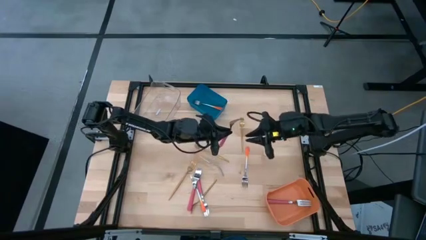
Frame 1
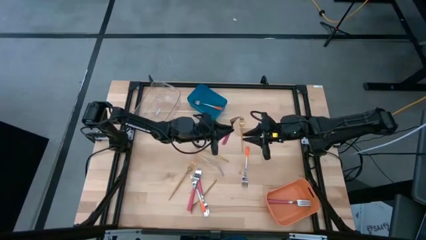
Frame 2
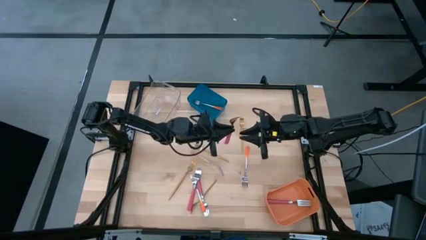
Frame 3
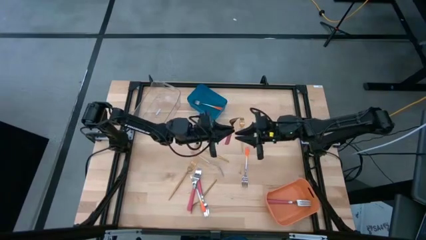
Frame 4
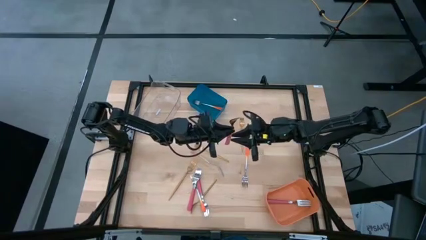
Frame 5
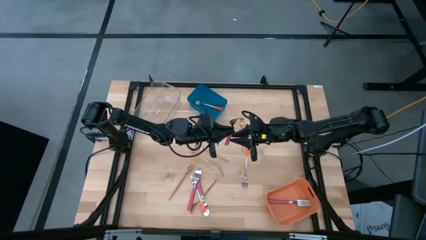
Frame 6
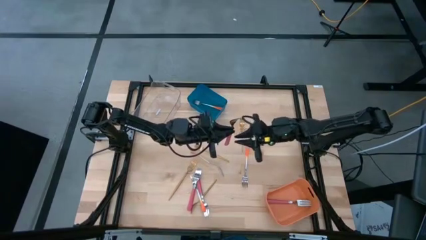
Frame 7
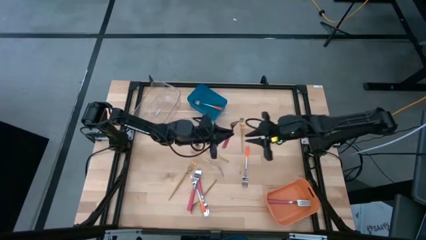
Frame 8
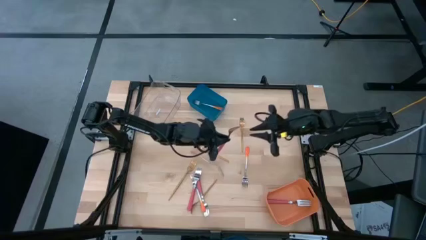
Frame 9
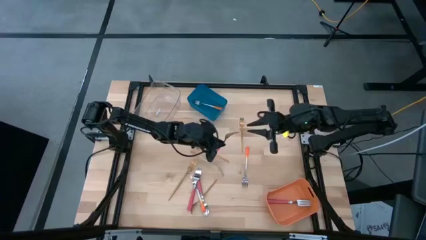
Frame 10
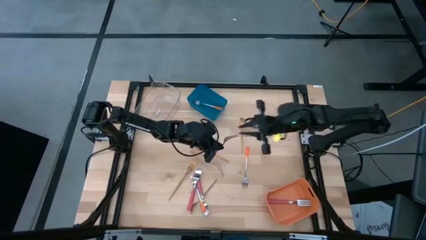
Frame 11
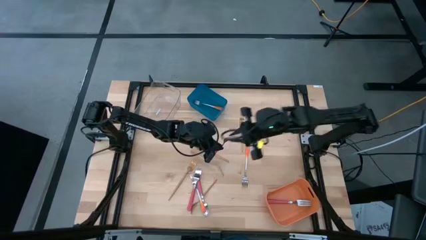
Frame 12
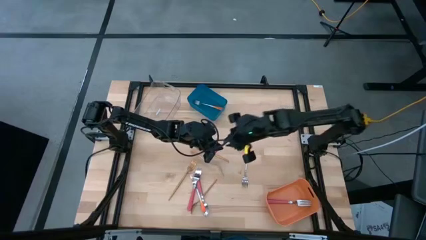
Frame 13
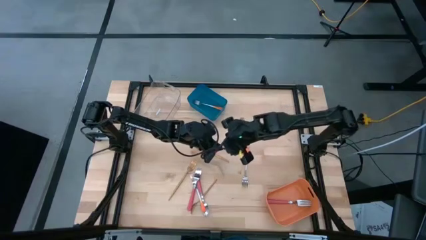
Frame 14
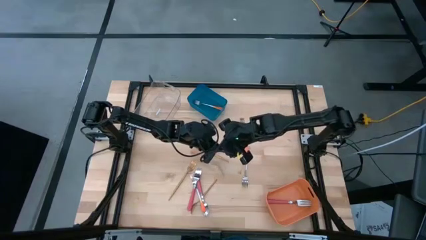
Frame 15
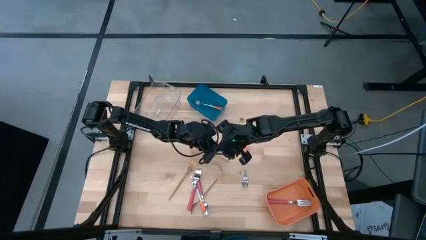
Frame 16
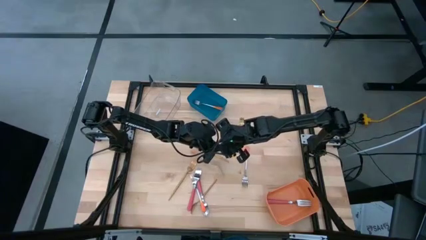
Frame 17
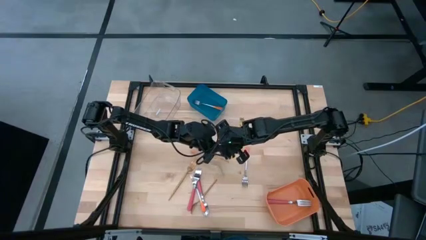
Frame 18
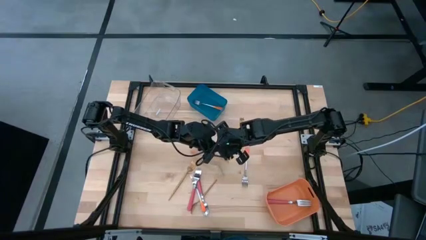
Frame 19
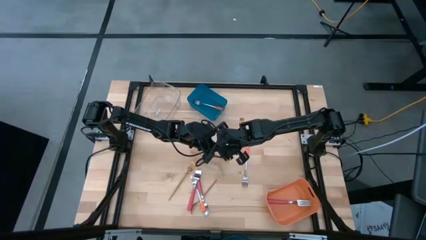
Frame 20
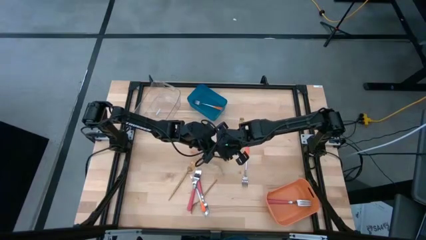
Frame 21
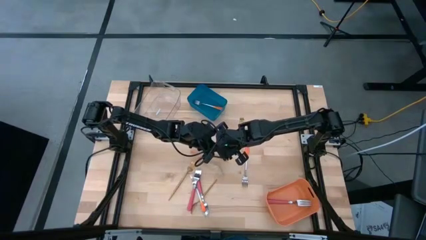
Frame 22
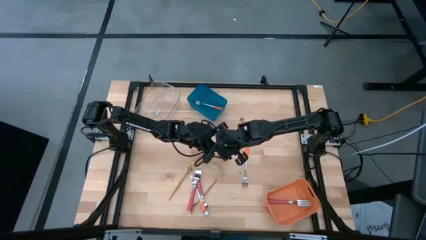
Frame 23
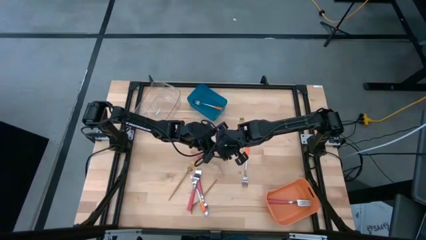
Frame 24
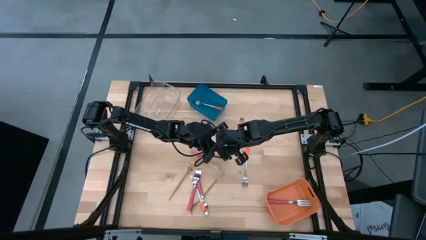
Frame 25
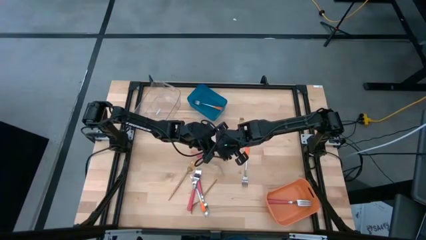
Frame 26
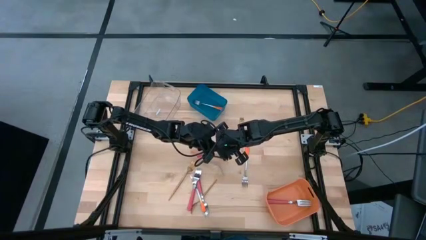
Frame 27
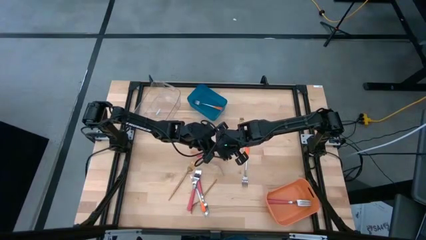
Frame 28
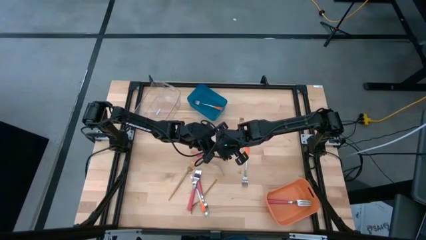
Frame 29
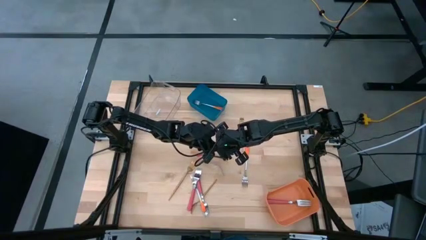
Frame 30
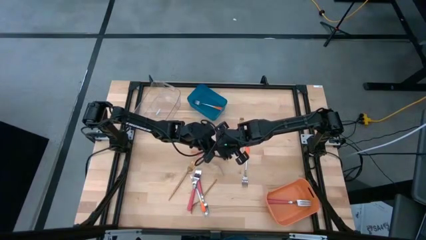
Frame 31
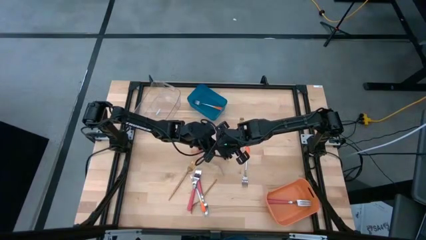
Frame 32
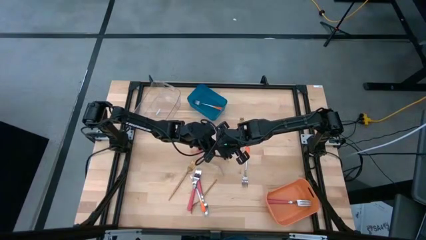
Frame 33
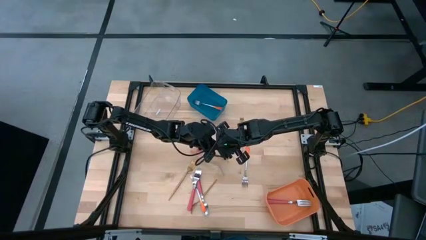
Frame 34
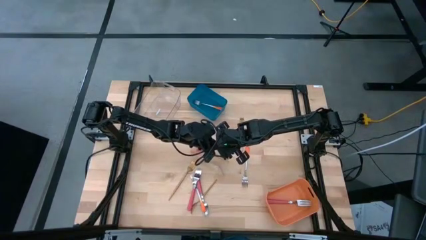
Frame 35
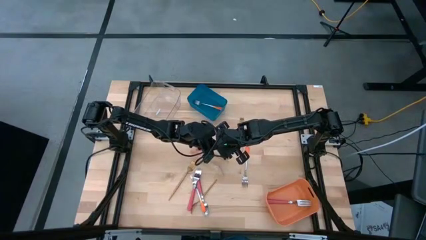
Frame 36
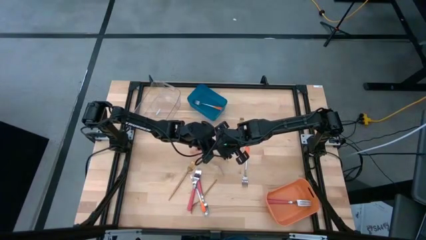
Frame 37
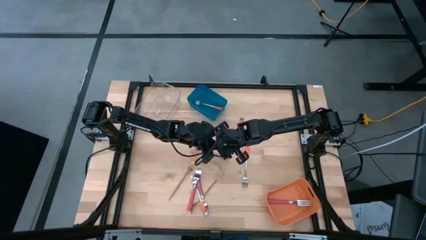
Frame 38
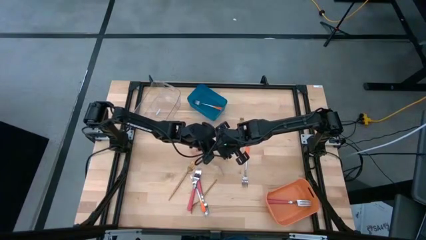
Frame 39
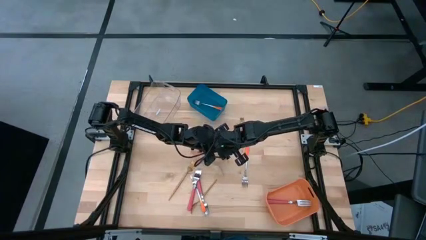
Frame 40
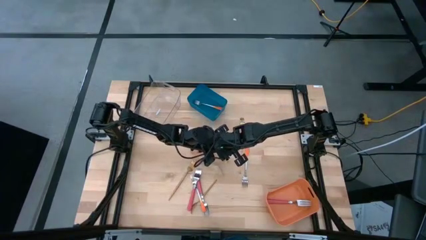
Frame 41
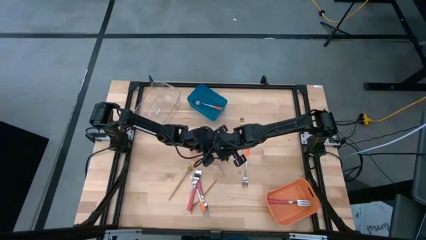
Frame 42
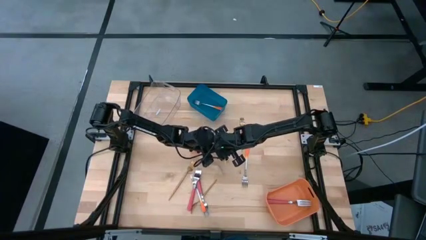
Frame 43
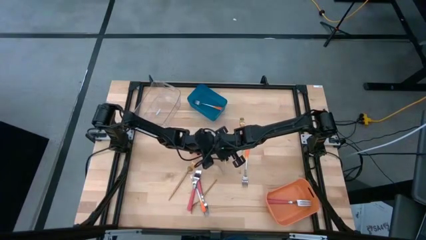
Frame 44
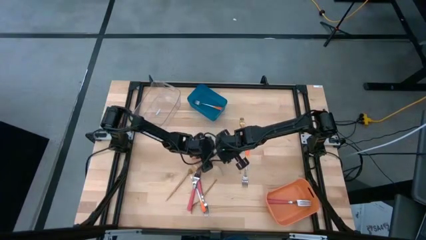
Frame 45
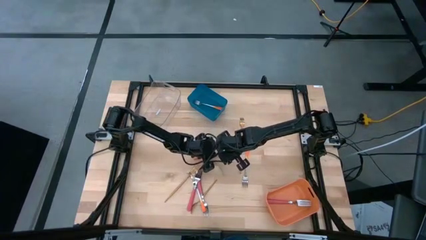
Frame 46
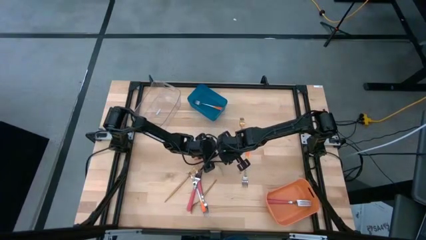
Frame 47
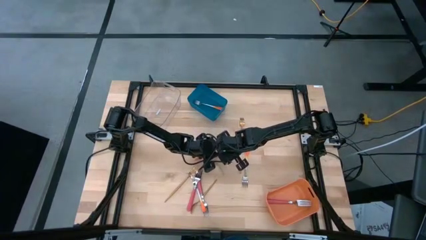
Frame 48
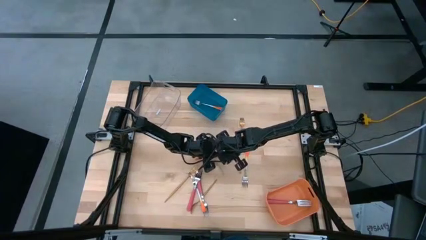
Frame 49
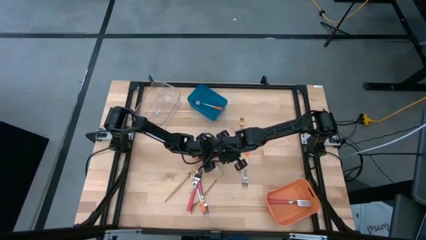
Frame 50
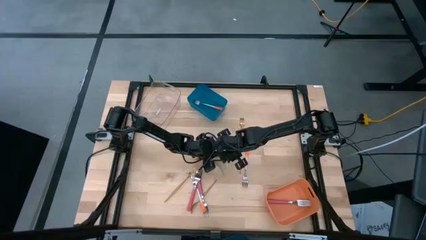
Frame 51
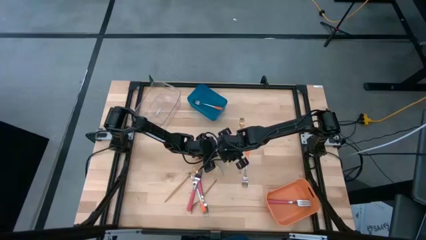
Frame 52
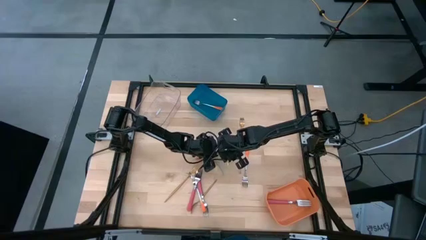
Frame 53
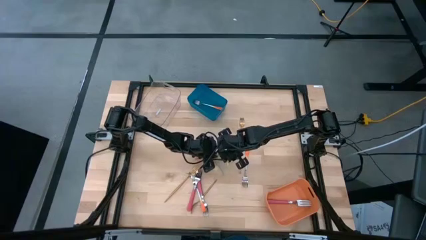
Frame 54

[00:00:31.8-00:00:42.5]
Task: Sort silverware by color (type)
Put the pink fork into the orange bin

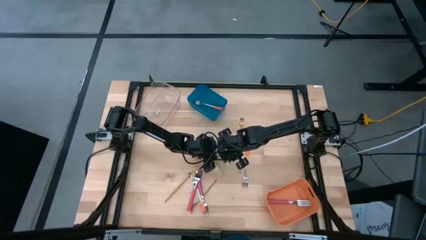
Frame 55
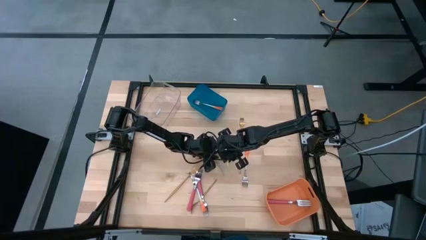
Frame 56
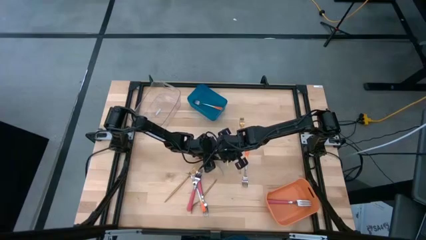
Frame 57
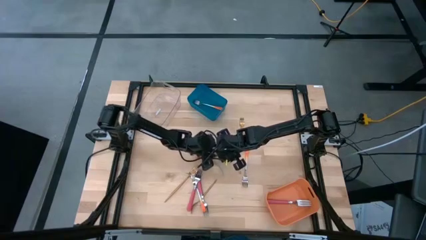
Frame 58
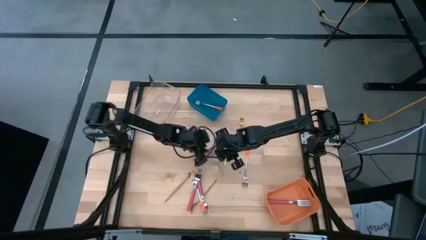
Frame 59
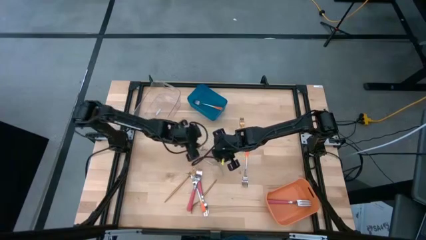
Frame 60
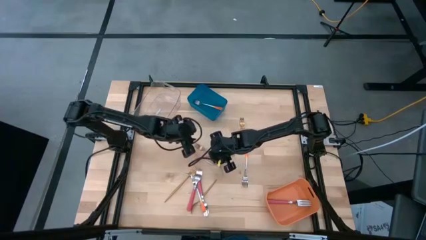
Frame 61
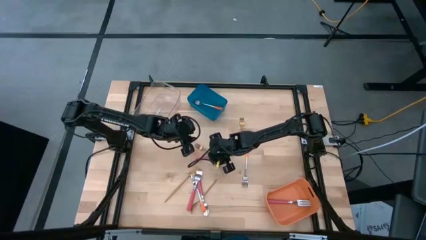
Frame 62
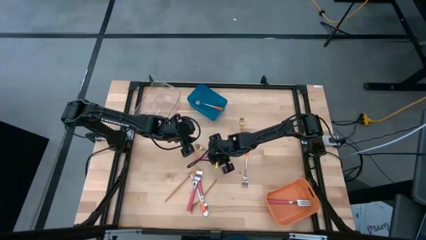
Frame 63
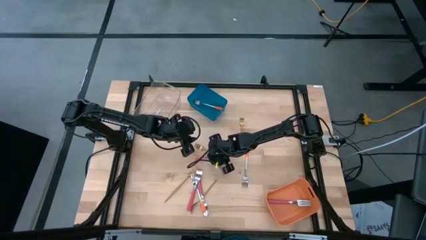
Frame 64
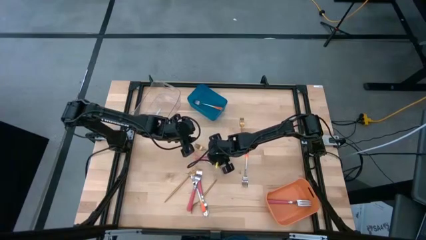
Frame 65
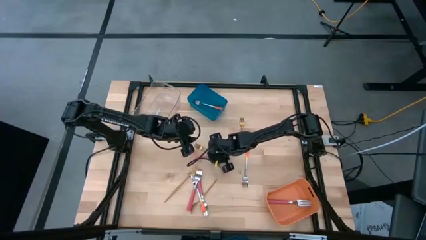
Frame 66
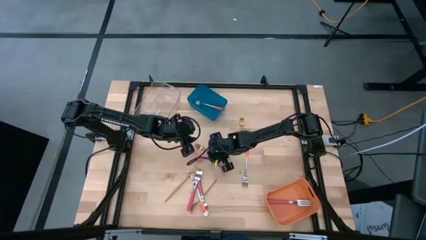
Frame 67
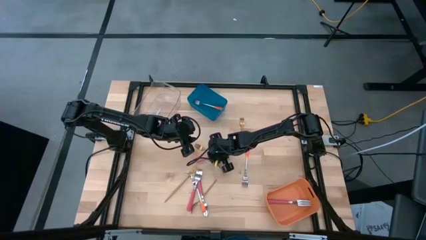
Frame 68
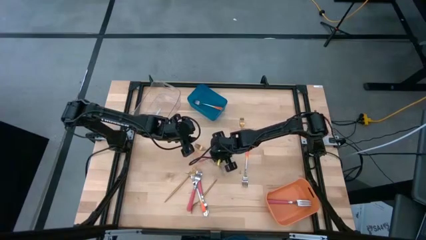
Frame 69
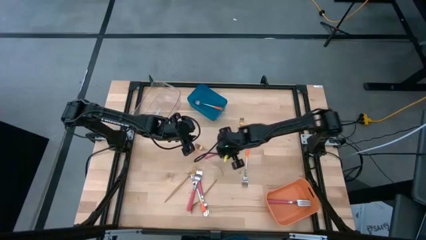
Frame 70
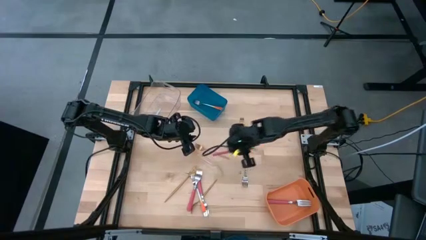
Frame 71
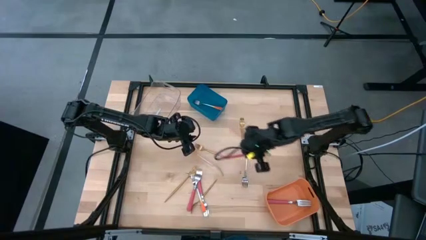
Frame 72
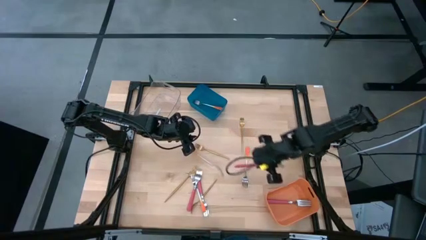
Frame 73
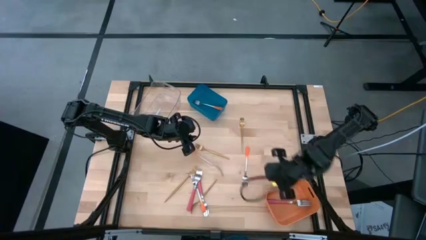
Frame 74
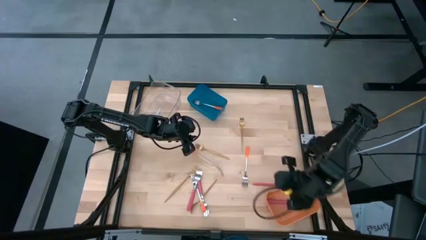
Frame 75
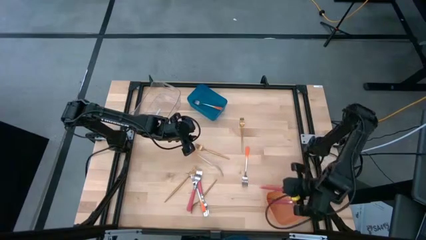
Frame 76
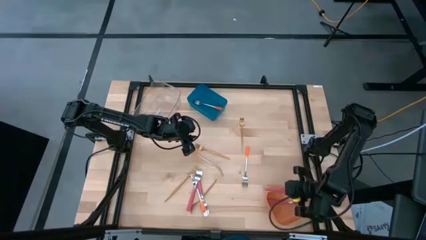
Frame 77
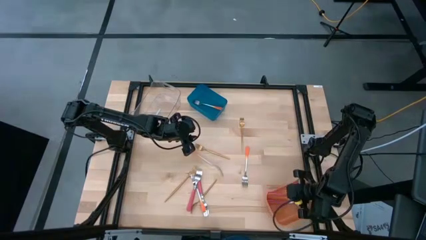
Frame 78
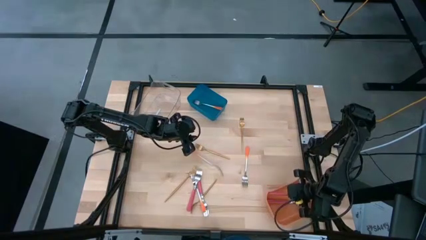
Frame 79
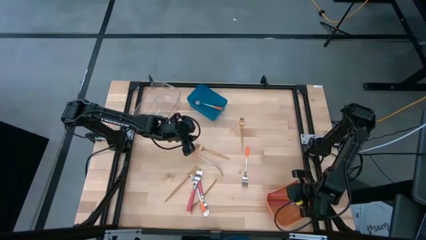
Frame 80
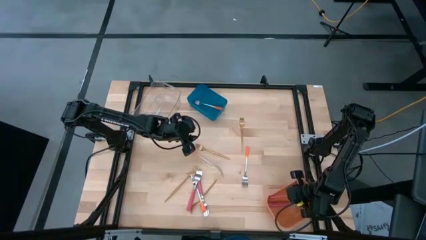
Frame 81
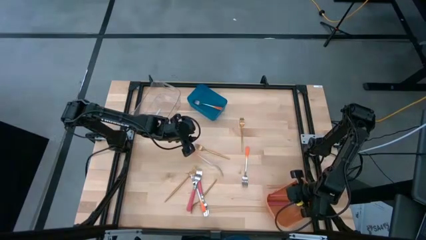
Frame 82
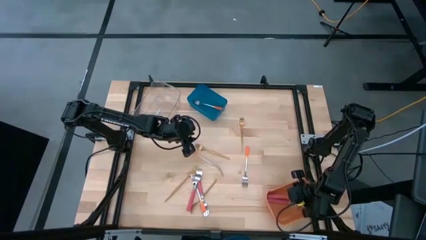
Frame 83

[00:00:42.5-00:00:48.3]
Put the pink fork into the orange bin
